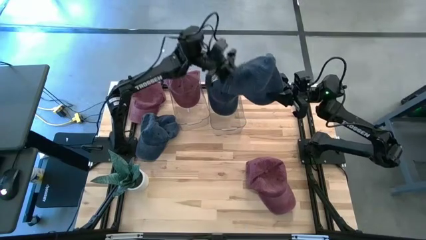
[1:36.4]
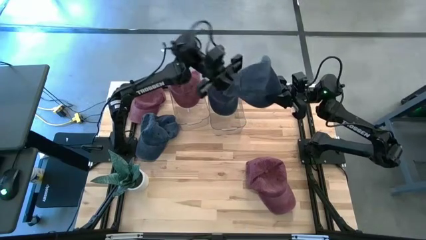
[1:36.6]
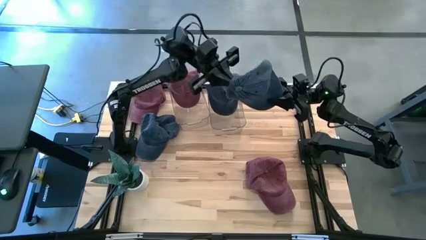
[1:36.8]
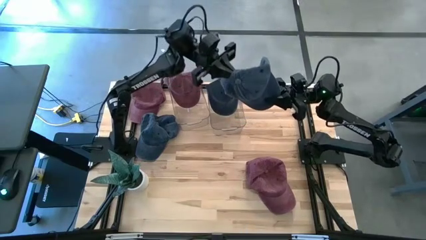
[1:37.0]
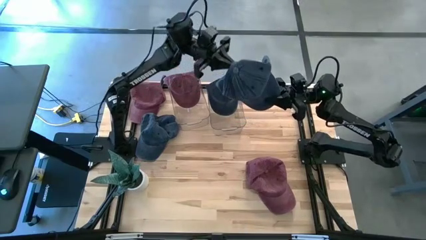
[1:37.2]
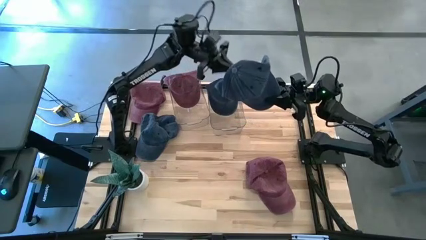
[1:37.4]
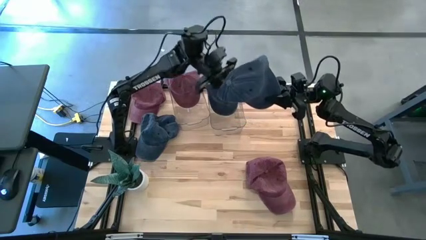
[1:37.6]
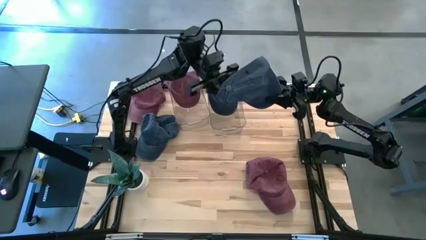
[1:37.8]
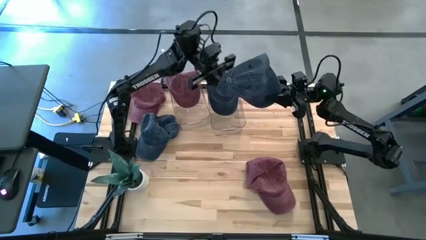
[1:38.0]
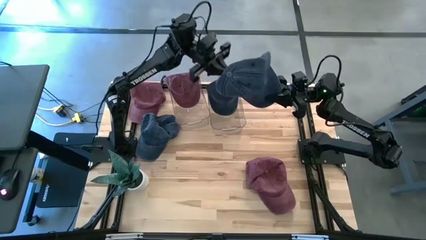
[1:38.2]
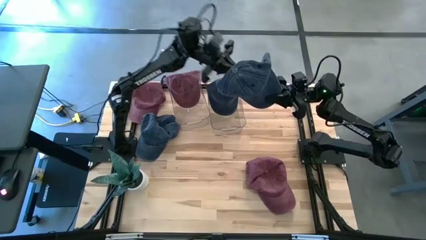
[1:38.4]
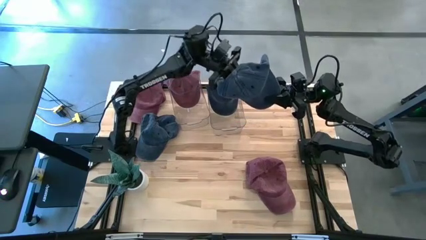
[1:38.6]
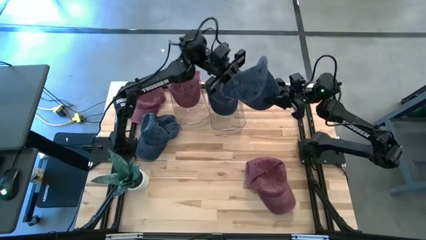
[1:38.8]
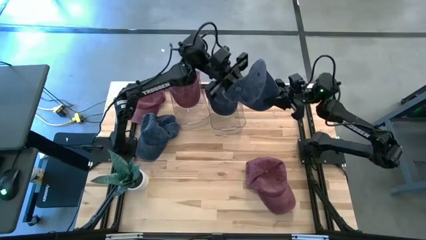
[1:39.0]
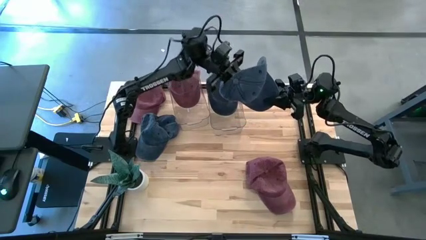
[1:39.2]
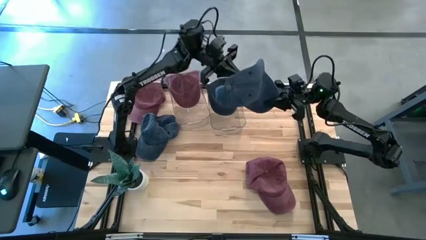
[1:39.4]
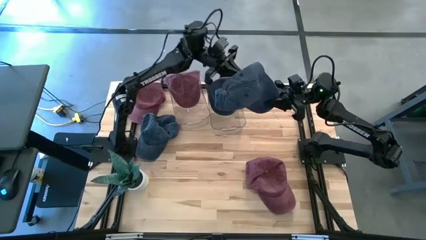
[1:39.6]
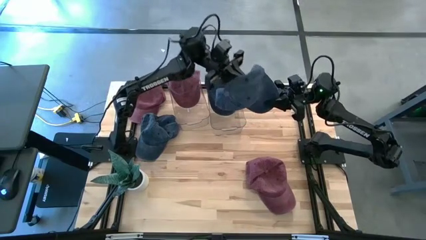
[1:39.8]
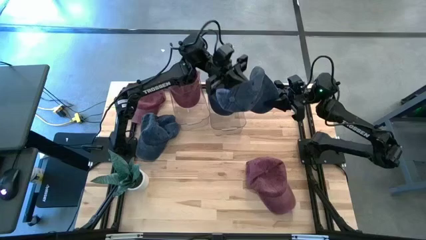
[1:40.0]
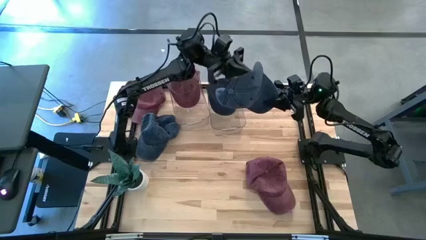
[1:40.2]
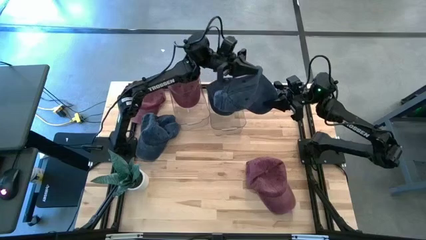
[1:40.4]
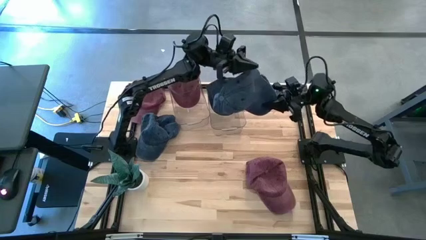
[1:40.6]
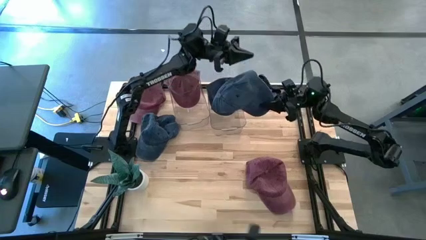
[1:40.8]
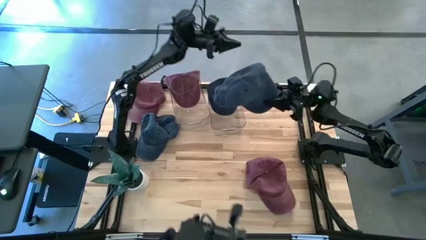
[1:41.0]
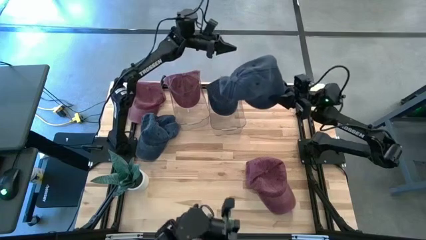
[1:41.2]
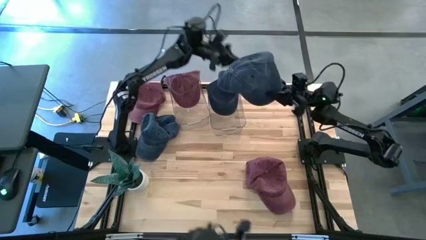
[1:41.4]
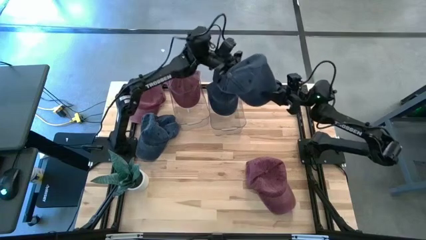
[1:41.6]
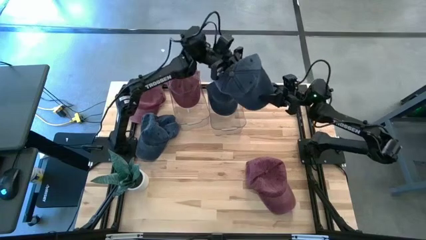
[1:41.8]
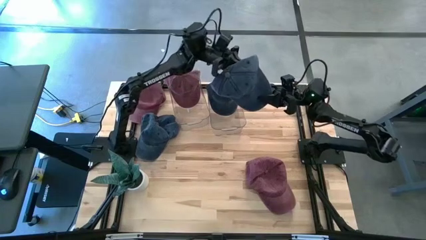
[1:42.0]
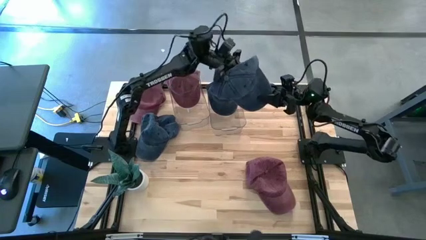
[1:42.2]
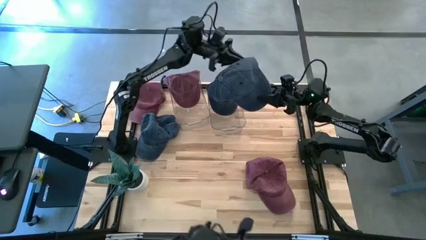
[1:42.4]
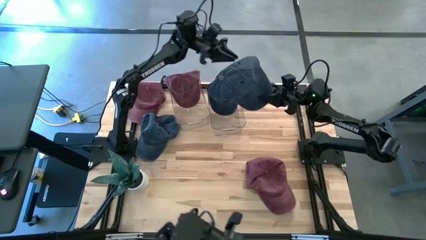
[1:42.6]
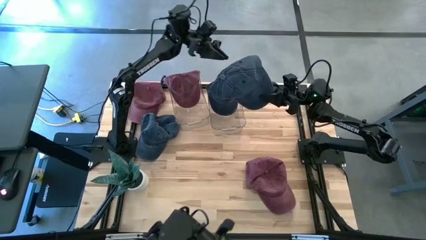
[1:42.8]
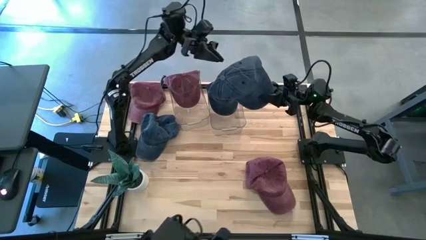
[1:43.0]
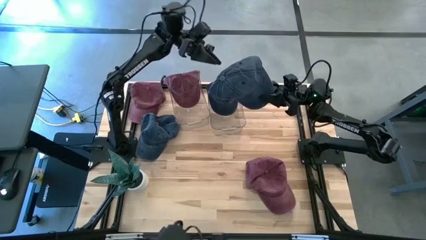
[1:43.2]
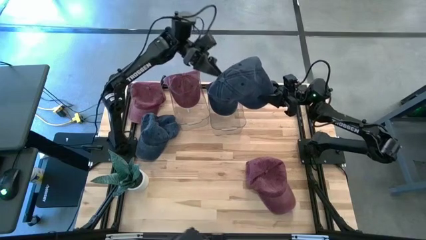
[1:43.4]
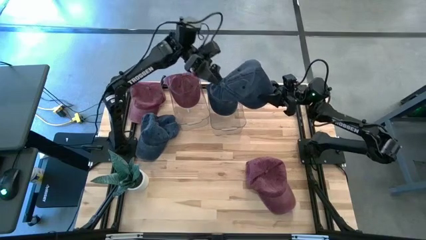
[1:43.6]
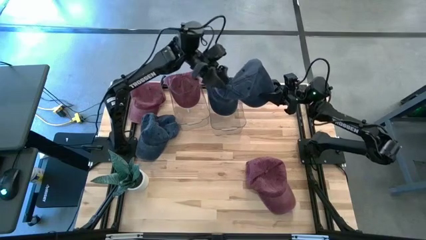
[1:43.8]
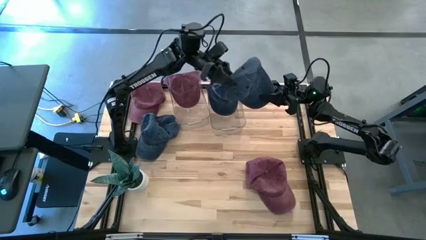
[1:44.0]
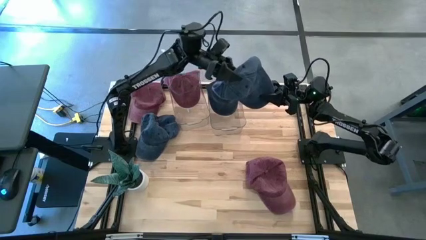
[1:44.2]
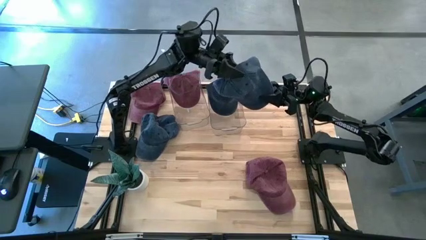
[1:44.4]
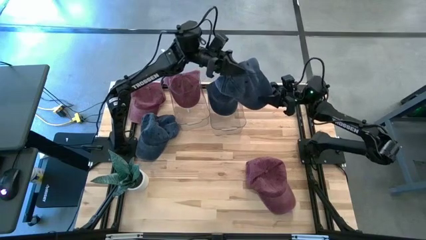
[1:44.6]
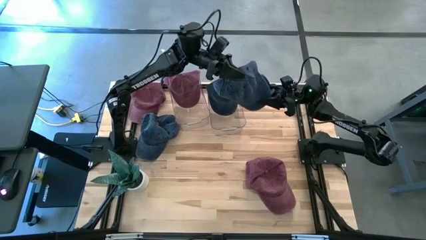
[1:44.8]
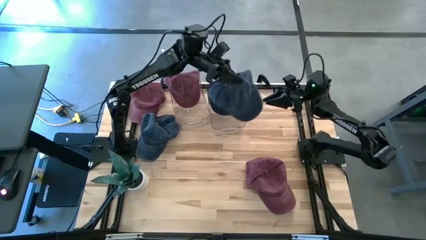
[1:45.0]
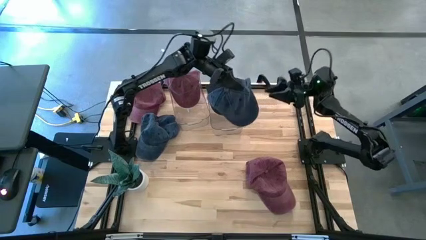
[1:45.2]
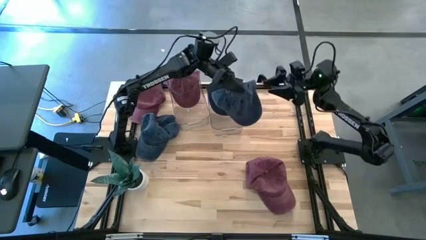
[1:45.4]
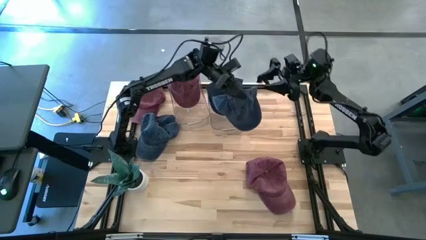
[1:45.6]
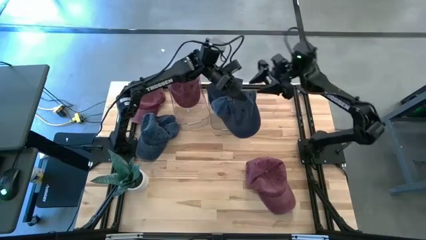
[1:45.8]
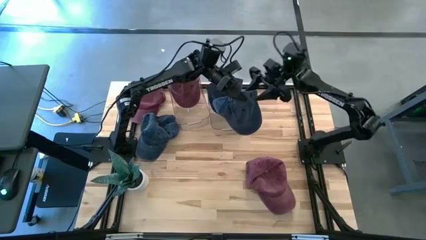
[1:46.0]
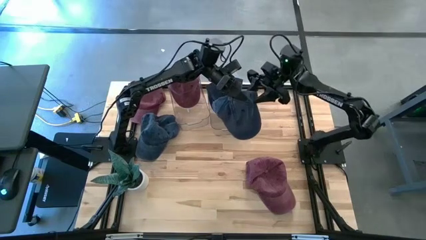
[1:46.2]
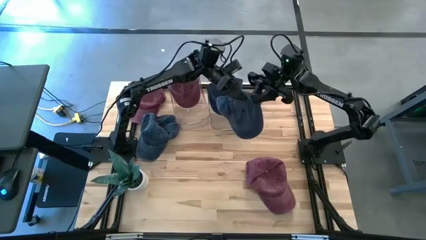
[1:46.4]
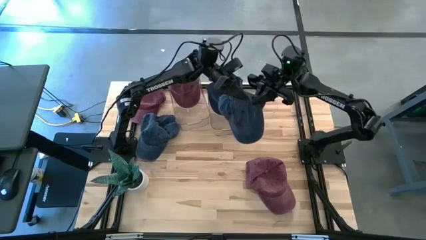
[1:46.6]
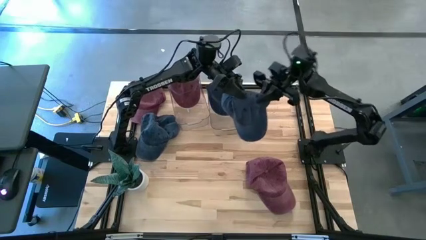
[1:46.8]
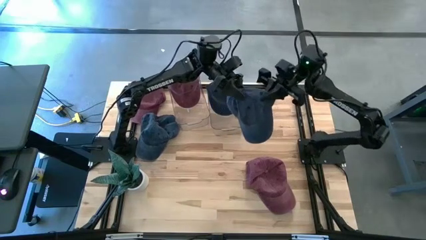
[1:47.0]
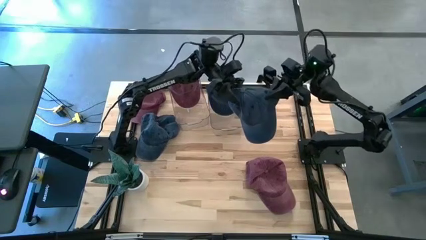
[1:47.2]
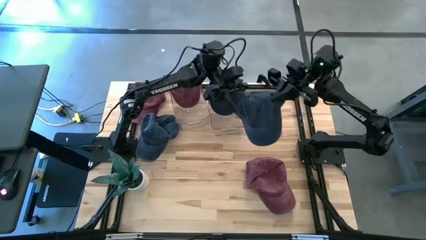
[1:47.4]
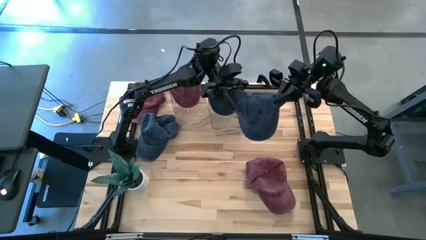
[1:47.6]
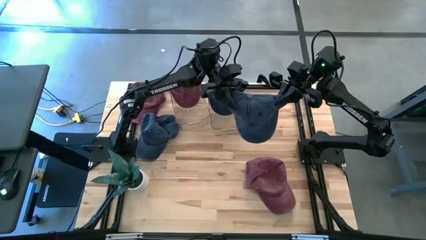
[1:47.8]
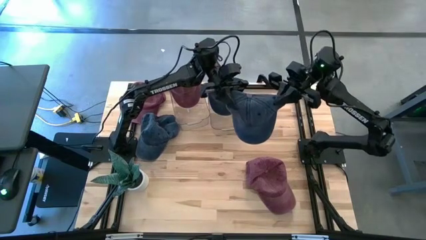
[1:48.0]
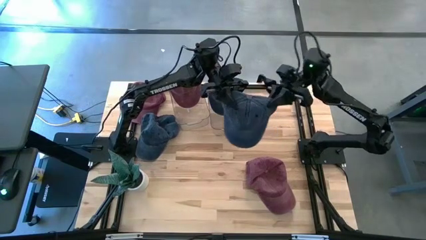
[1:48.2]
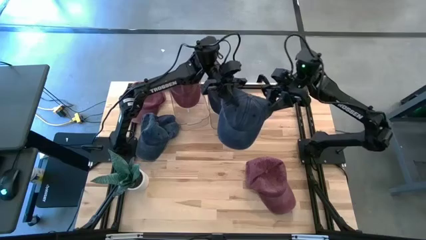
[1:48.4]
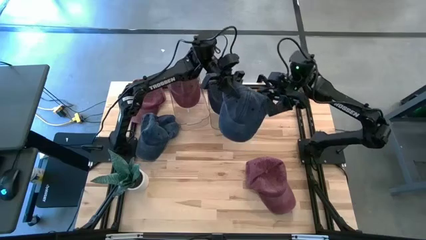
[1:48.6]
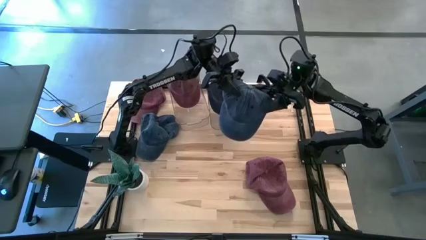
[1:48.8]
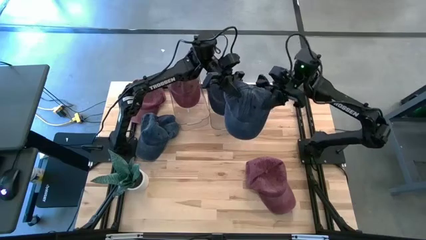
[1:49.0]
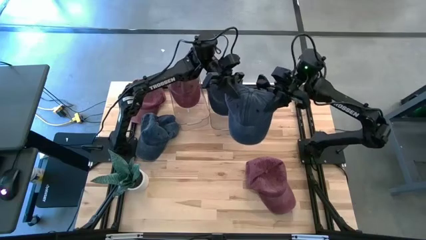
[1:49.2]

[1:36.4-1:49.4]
Task: Pick & Place hat
Put the right blue cap into the right bin
